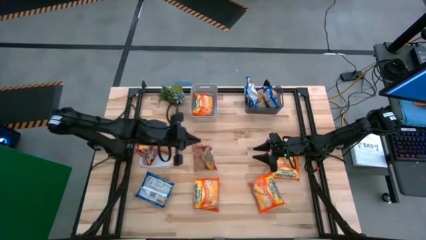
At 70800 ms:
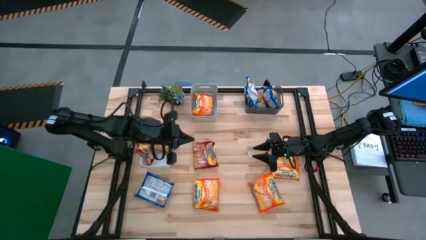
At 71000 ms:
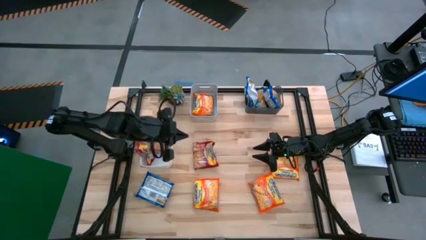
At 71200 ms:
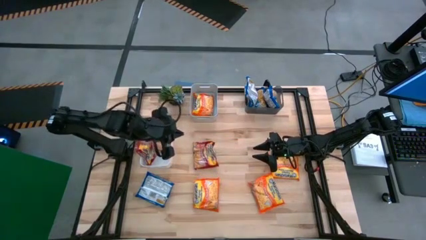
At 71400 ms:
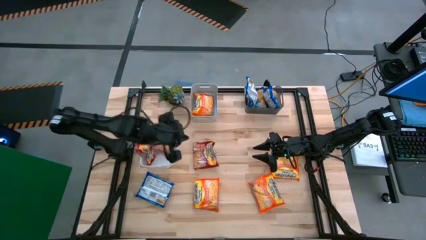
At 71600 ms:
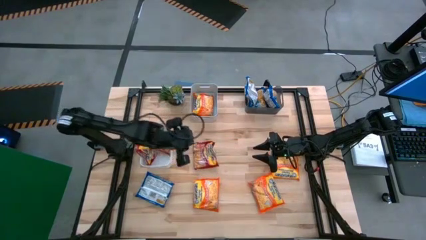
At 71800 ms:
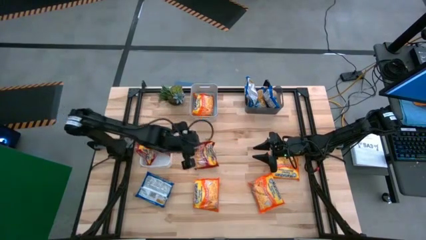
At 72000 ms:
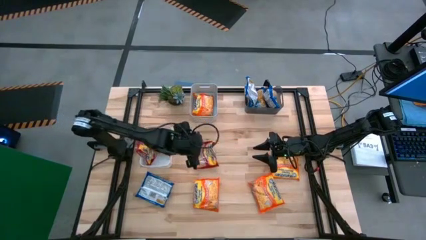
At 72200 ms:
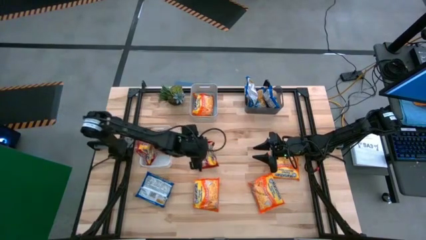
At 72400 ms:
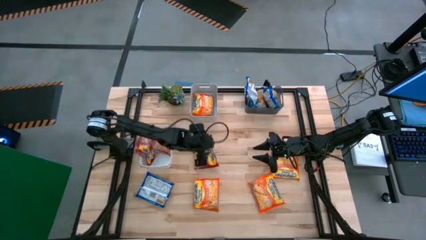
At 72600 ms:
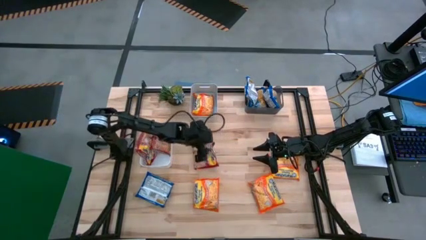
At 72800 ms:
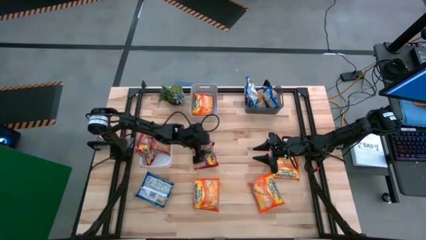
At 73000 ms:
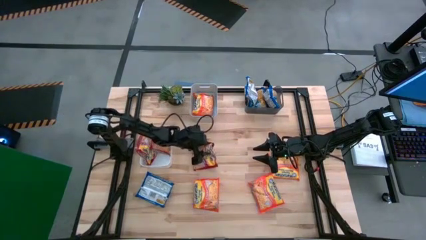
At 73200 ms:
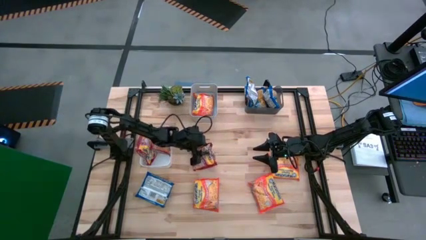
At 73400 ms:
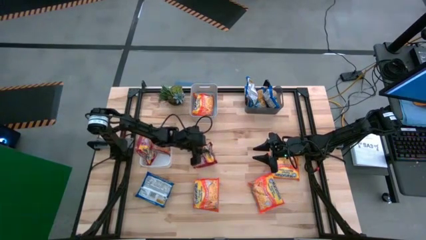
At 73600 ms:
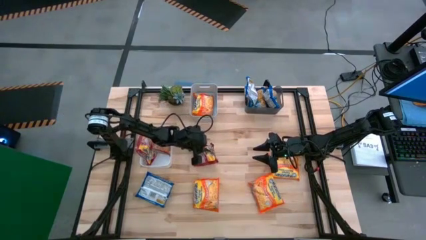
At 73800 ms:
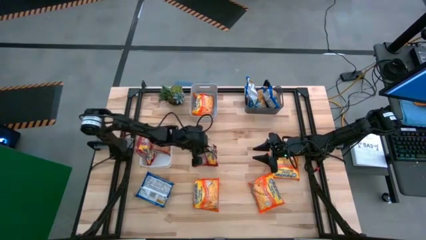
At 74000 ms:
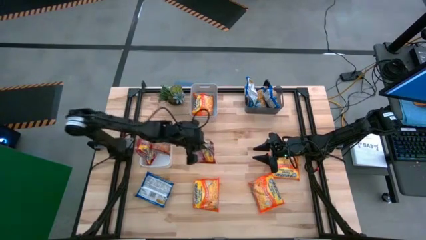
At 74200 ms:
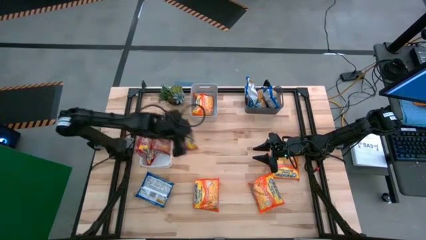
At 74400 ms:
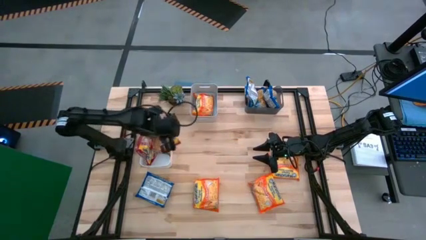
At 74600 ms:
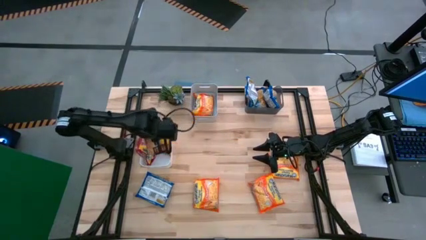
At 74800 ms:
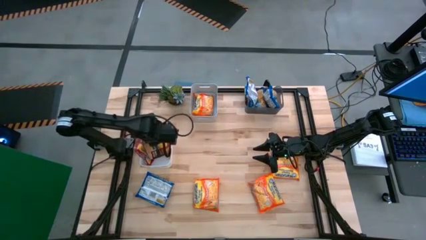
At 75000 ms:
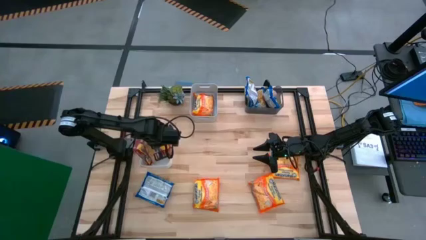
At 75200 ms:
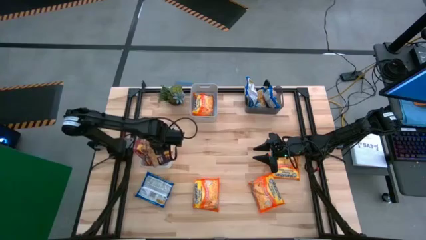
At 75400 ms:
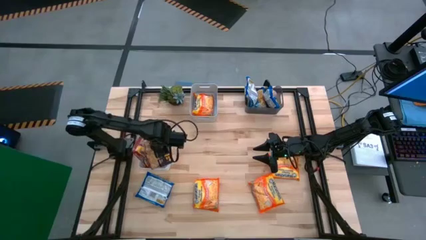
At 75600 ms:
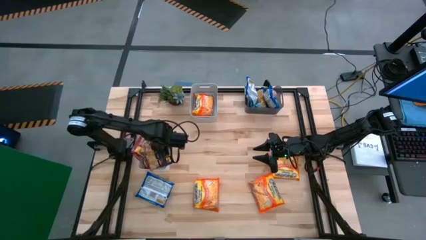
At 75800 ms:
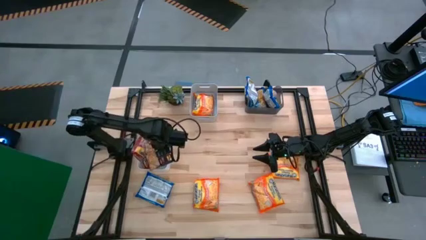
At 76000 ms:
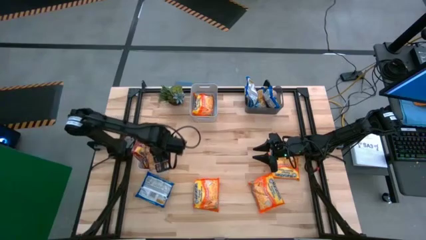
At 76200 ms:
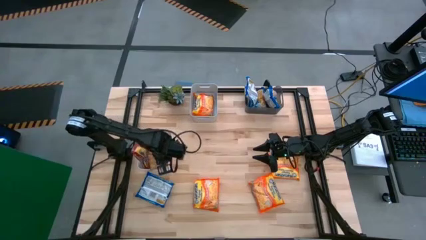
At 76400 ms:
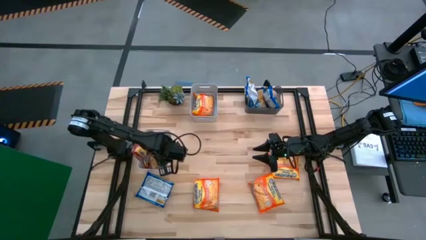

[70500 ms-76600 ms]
Task: Sort Maruchan noodles
Put the red noodle pack into the white bin

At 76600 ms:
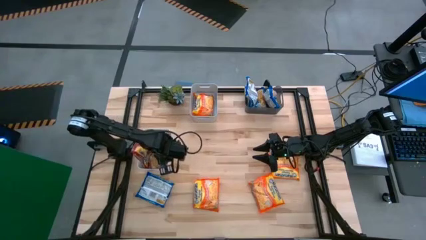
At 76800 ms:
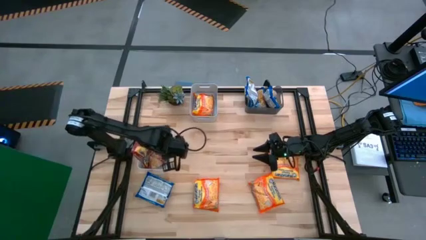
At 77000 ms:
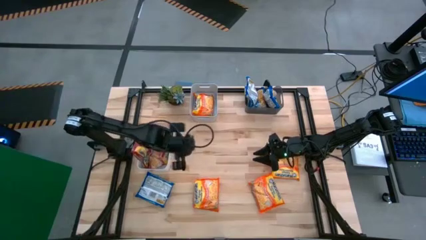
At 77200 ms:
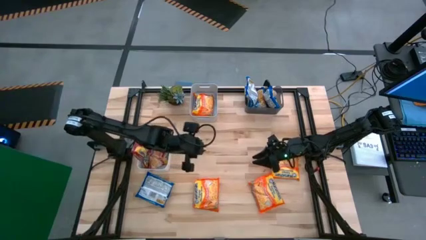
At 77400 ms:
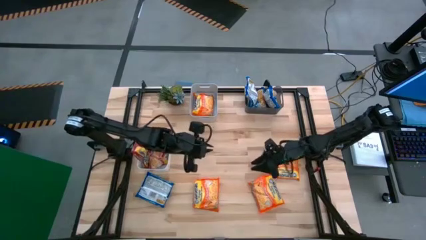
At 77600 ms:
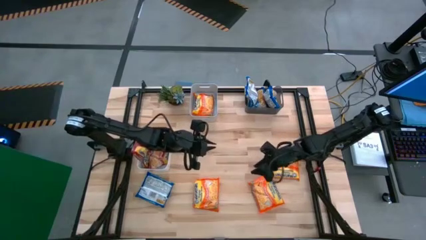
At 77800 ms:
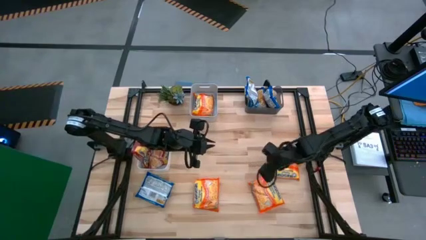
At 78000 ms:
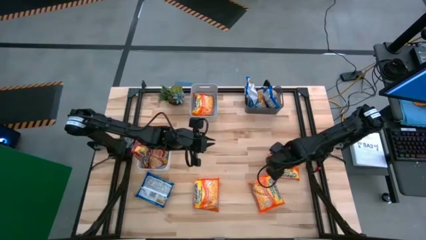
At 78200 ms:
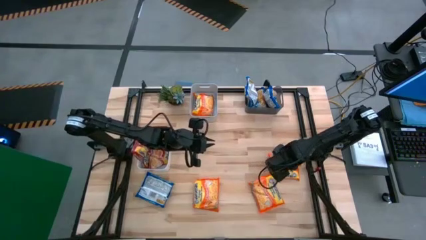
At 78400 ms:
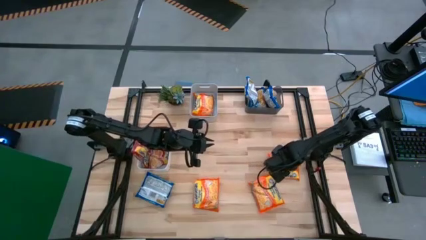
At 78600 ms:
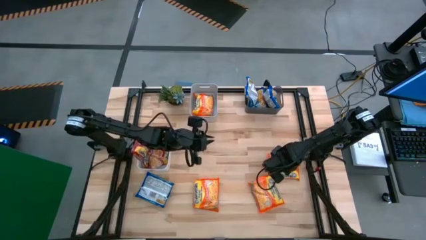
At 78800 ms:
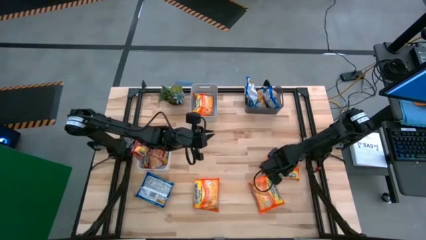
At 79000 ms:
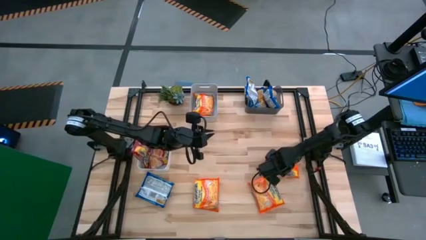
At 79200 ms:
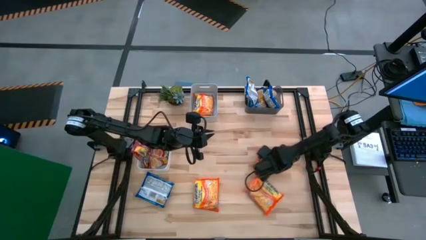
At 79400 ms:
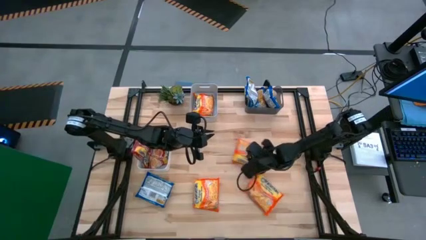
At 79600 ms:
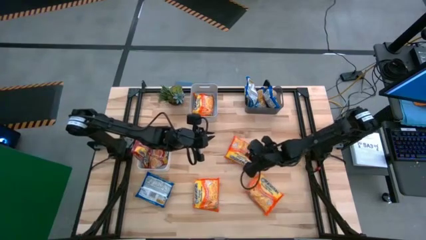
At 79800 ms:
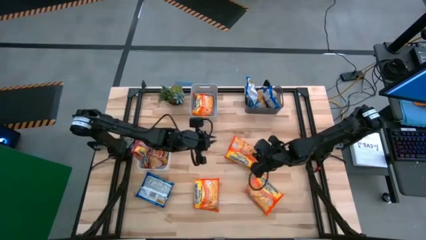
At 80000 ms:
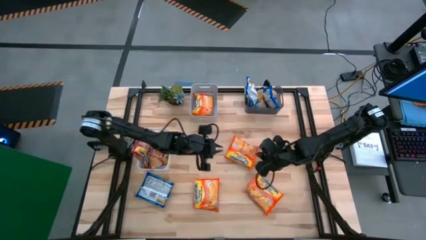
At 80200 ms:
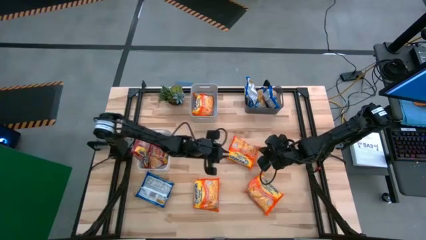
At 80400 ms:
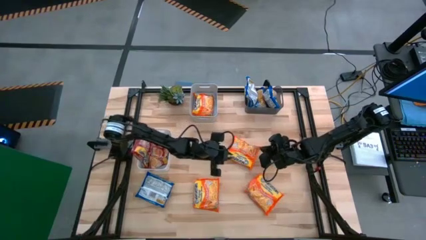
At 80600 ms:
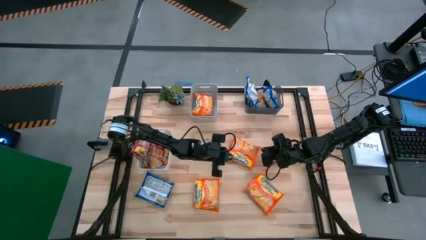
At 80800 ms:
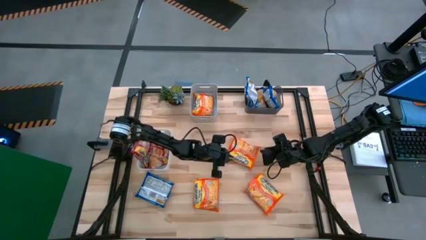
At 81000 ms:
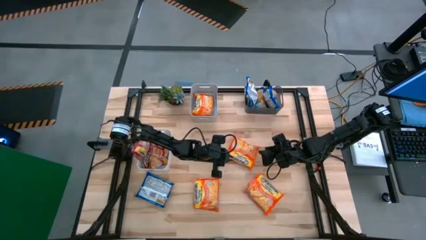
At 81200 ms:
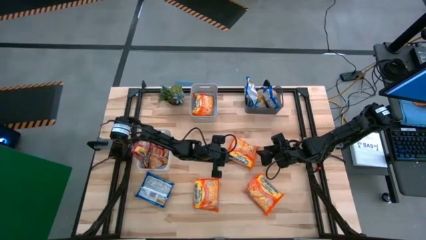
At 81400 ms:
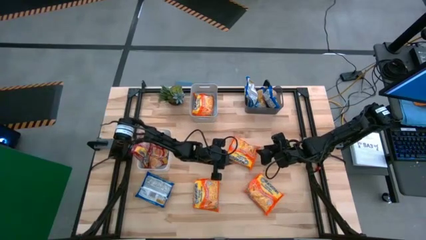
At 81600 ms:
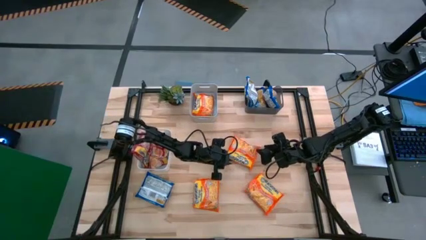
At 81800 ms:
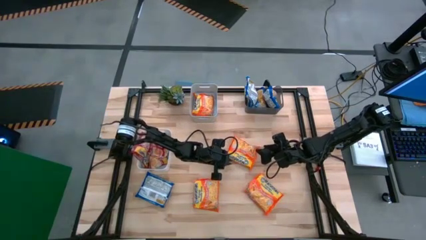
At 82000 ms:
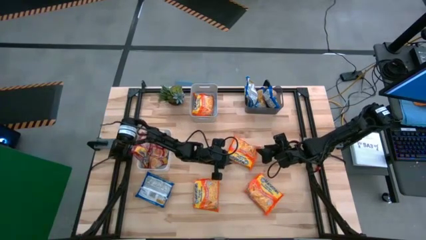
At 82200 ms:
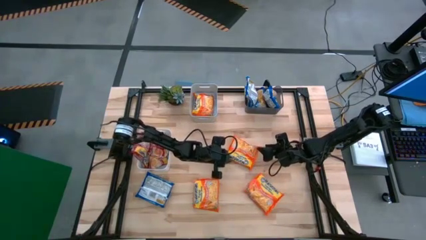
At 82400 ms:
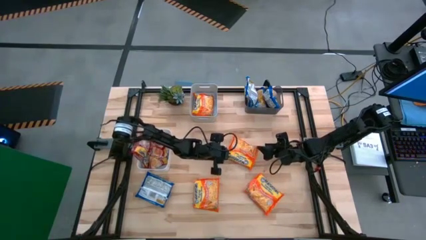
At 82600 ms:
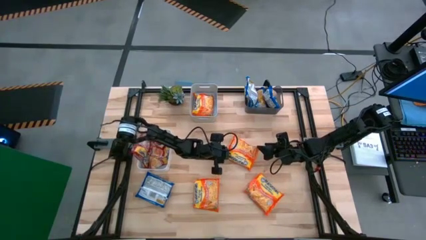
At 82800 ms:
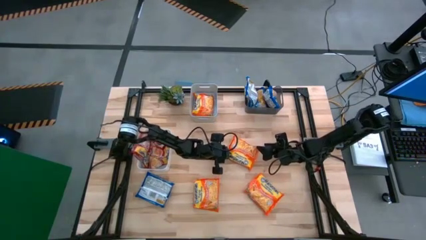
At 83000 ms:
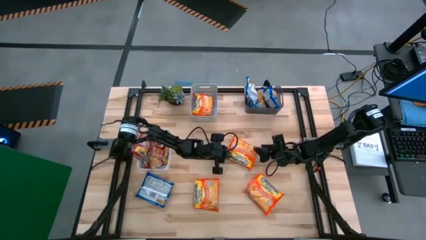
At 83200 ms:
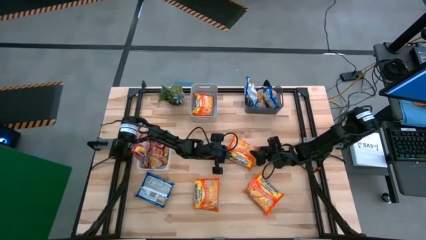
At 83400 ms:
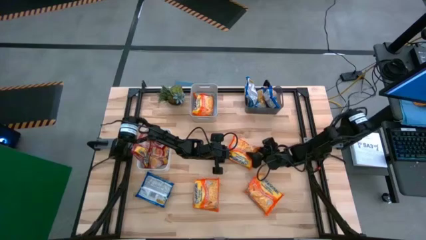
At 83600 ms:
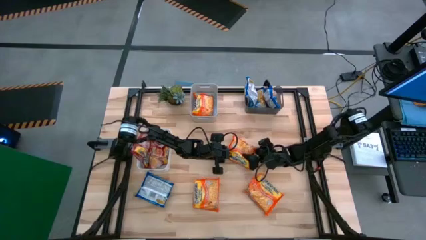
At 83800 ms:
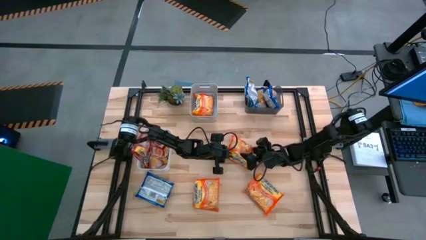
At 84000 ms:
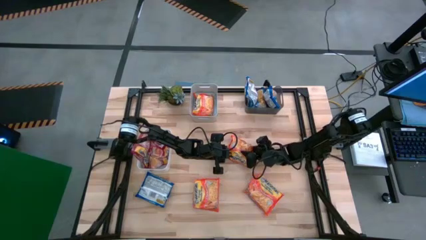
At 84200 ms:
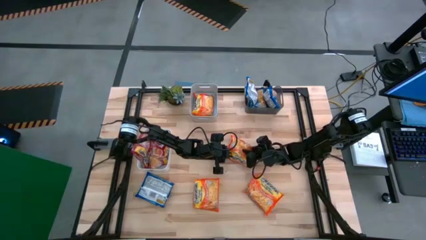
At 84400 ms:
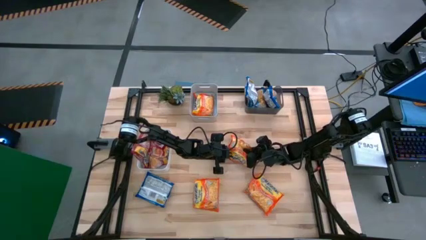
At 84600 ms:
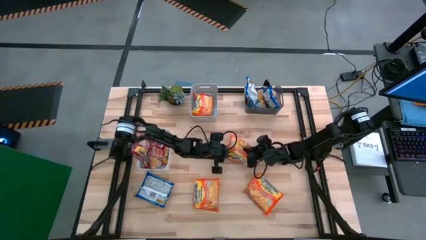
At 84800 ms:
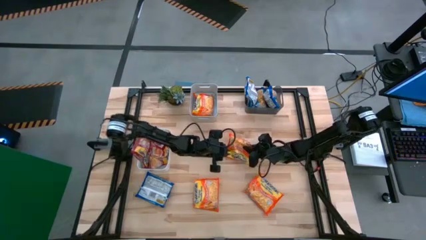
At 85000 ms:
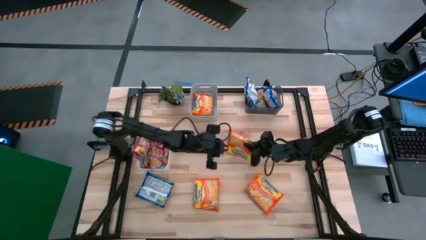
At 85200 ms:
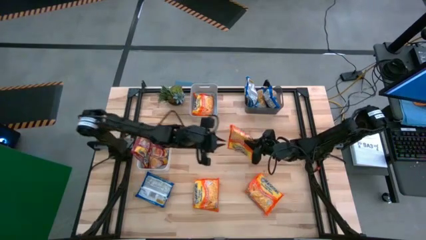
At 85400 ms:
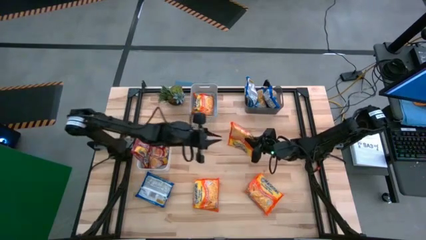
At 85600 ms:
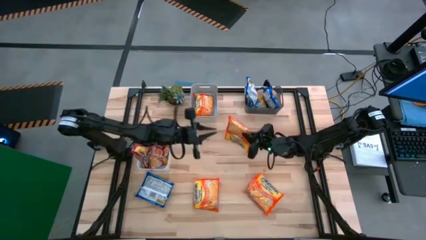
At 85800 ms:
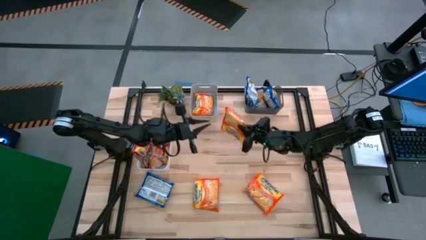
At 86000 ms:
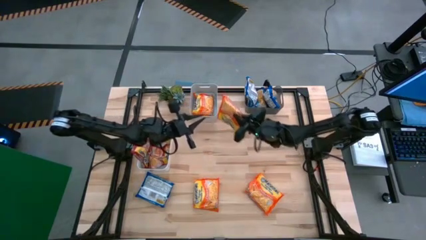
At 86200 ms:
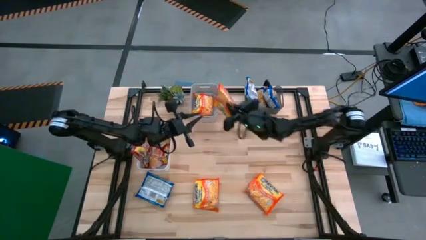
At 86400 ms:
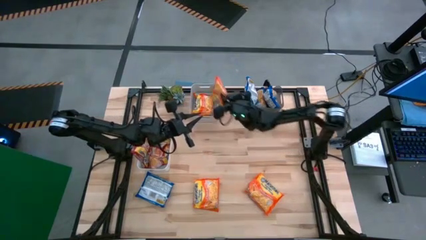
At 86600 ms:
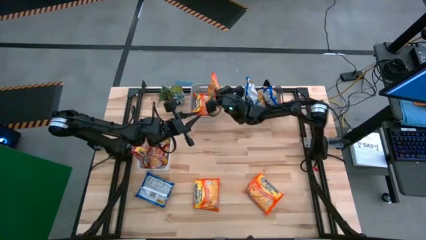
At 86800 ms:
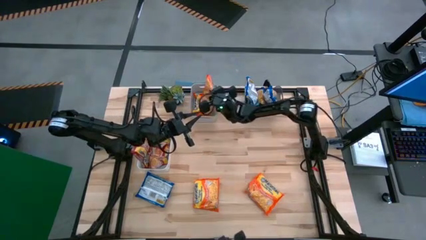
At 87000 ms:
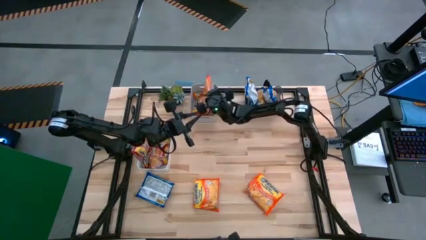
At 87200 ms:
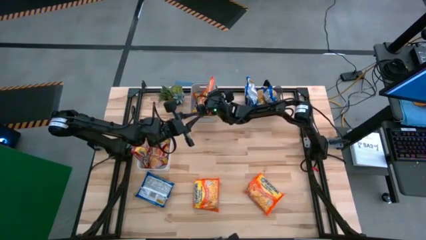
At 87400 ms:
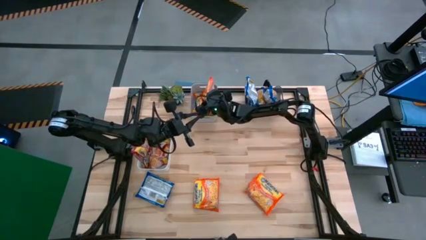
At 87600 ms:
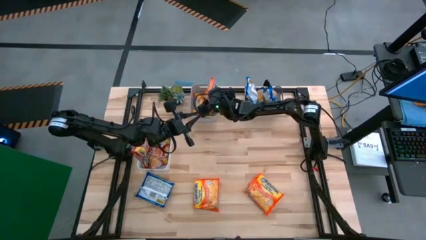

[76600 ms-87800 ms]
Put the orange noodle pack into the gray bin
